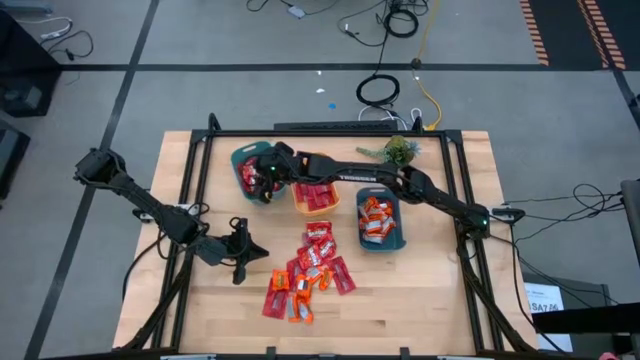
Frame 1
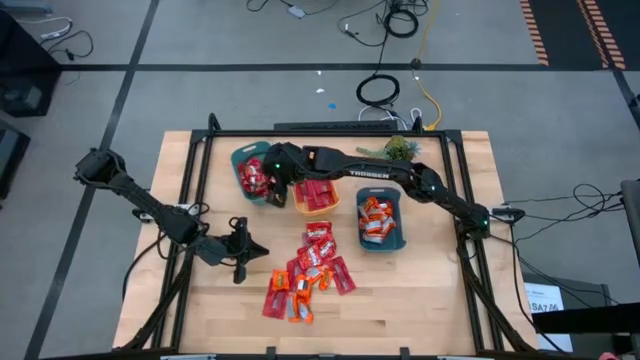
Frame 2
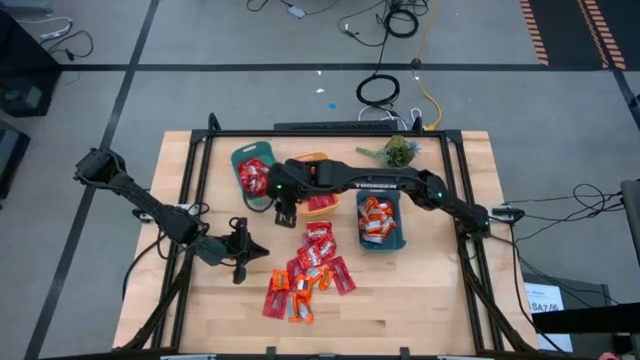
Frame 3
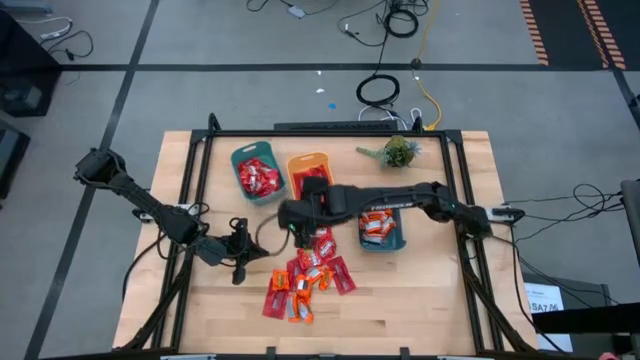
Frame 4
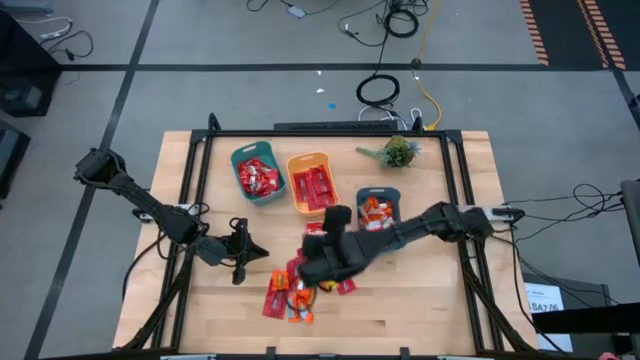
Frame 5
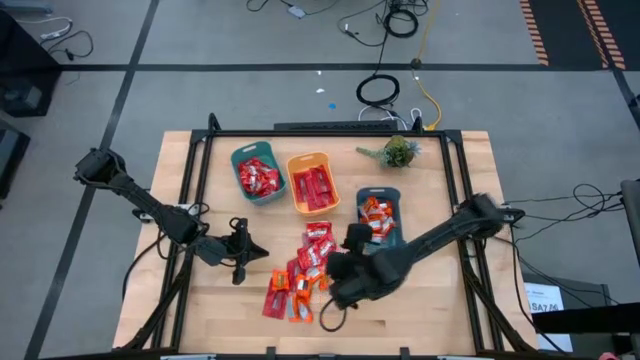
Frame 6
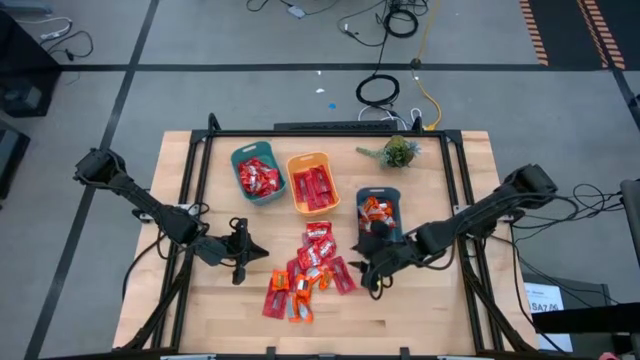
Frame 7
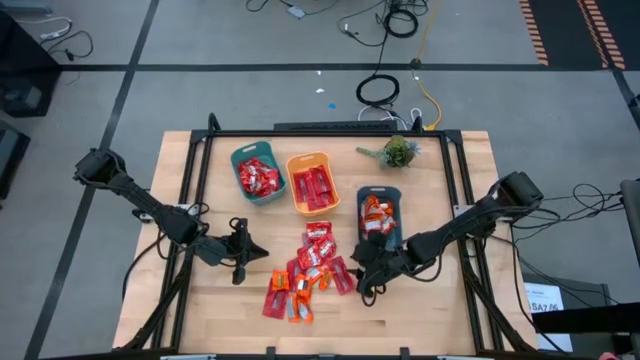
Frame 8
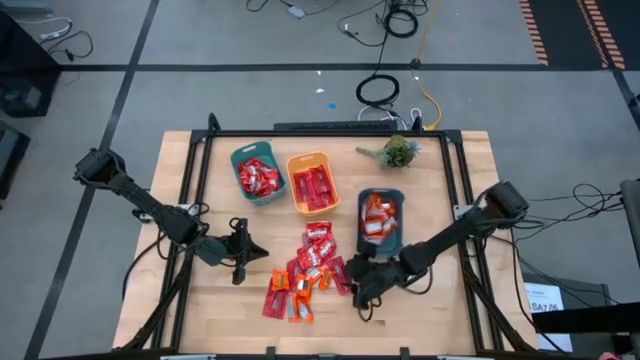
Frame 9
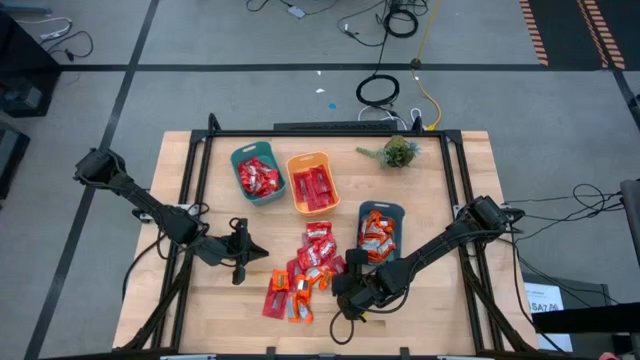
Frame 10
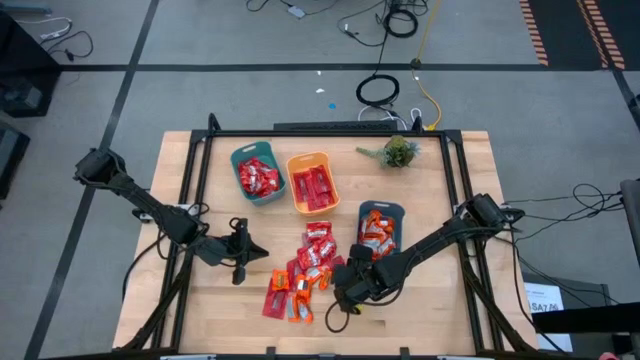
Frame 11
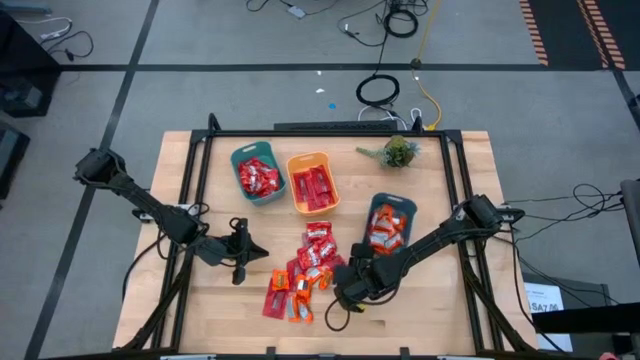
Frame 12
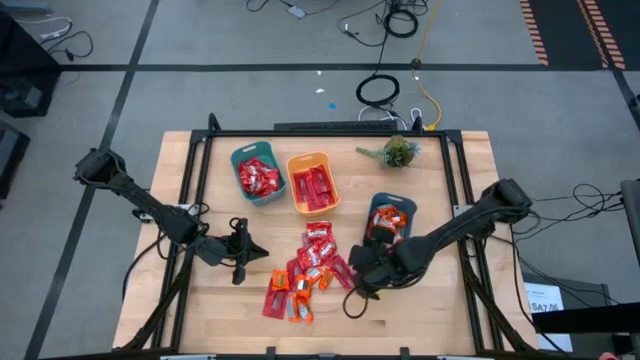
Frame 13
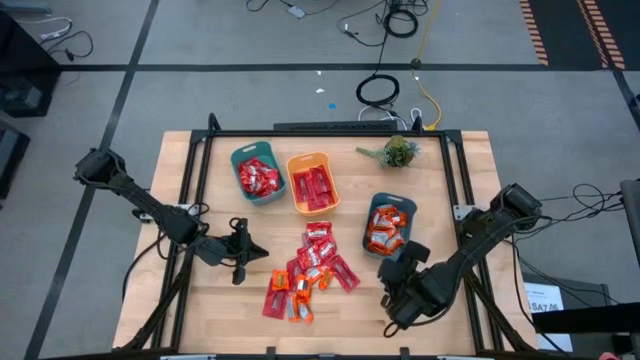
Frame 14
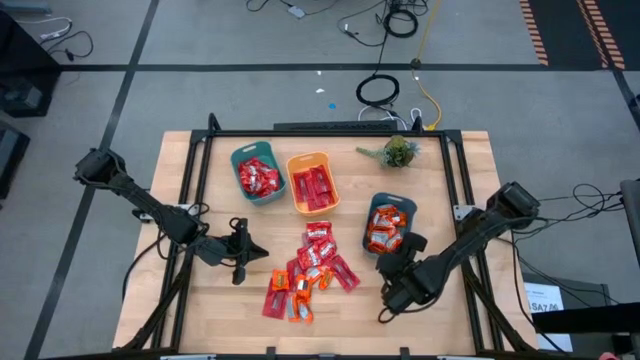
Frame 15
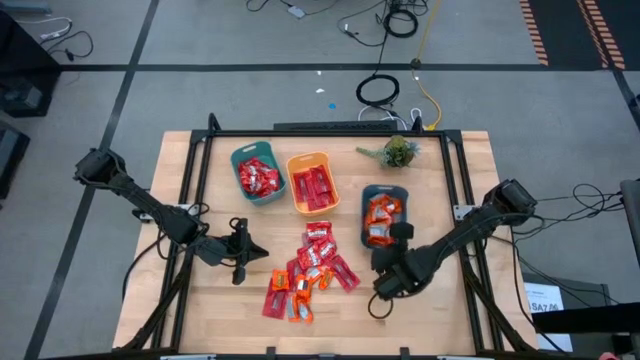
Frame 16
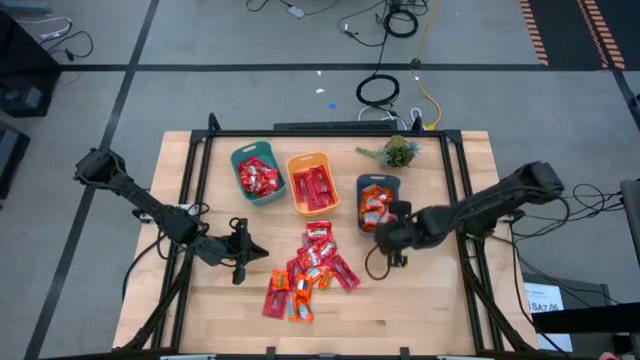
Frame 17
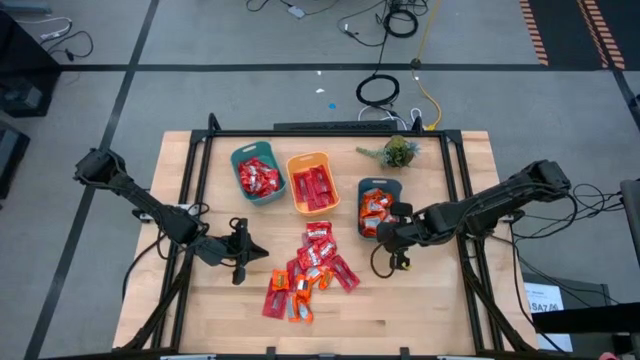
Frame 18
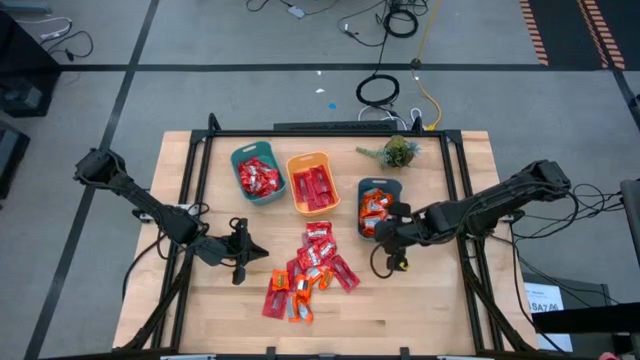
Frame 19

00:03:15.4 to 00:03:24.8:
Task: Sort candy
Adjust the dark blue bin

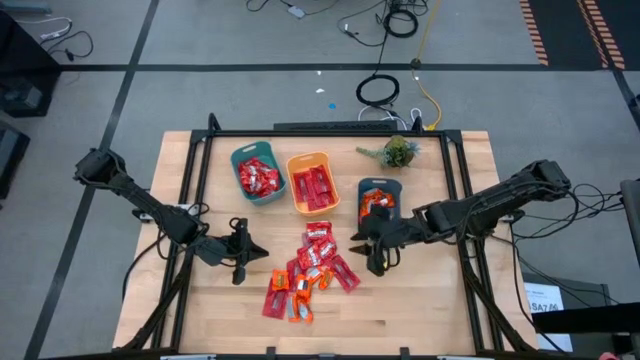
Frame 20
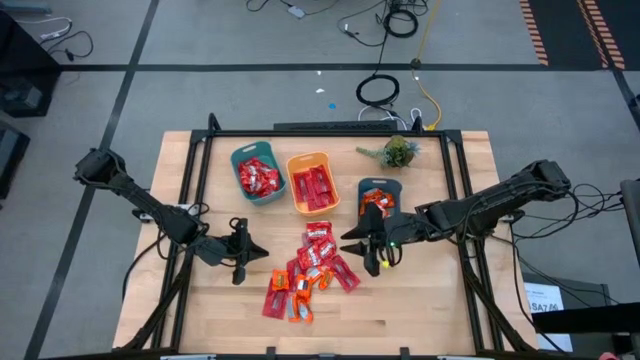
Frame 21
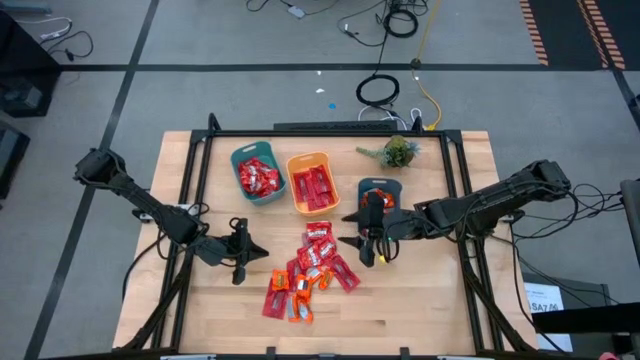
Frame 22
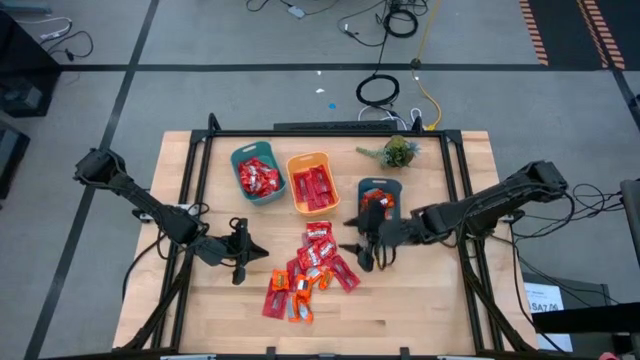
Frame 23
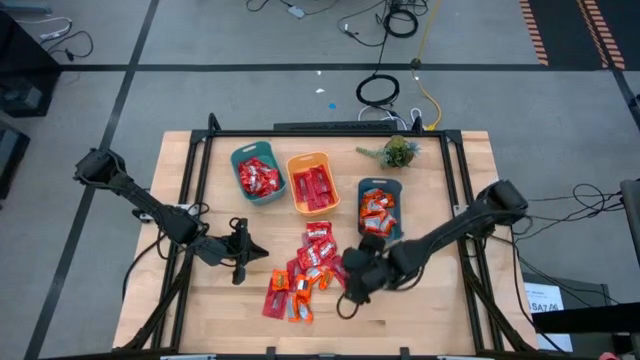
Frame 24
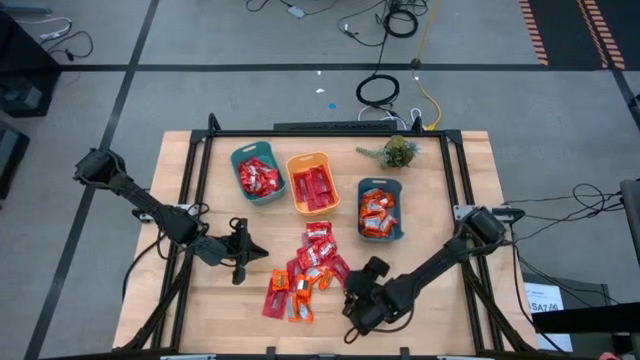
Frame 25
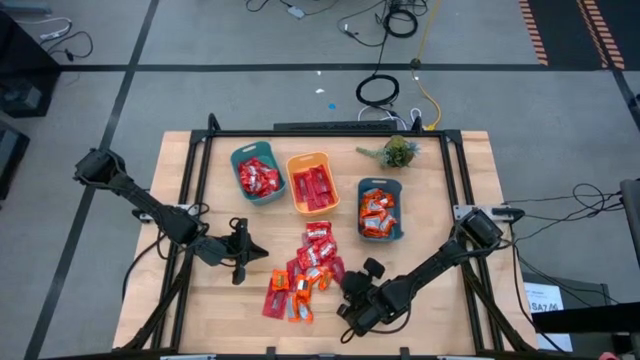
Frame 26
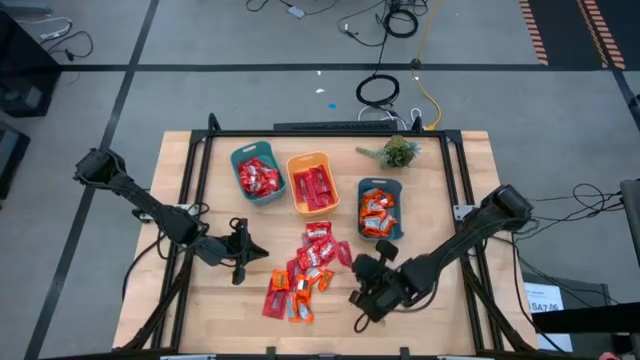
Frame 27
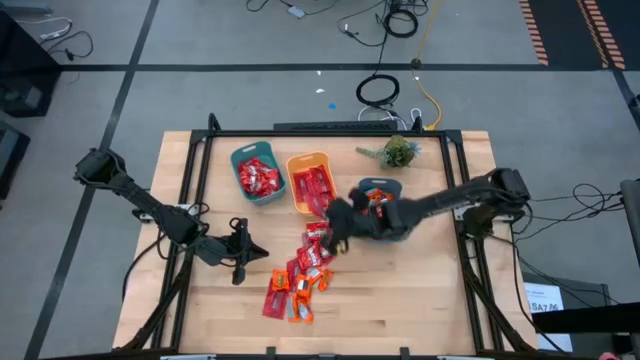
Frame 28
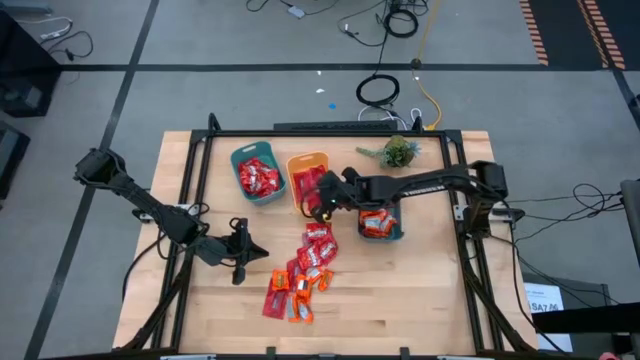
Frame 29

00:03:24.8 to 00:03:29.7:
Put the red wrapper candy into the yellow bin

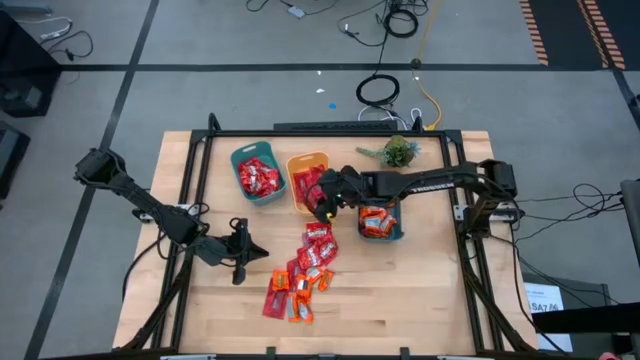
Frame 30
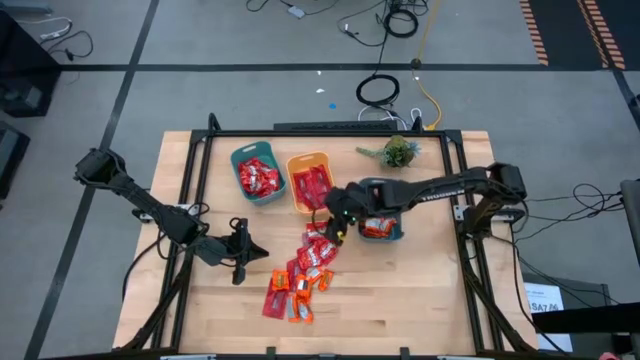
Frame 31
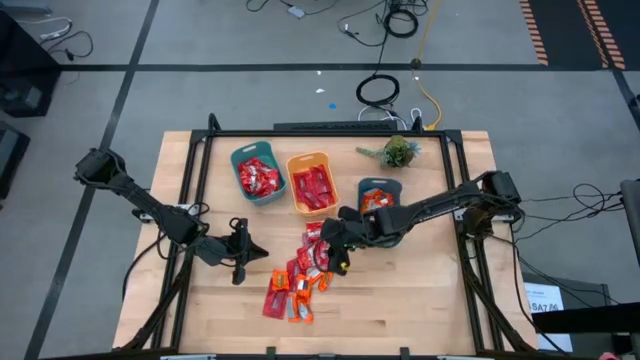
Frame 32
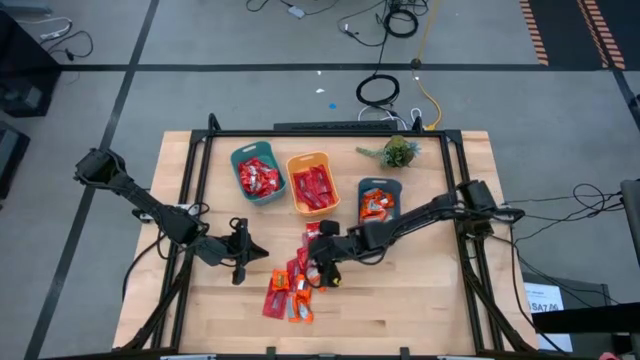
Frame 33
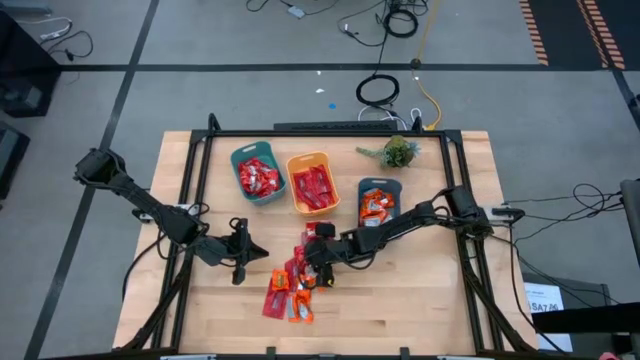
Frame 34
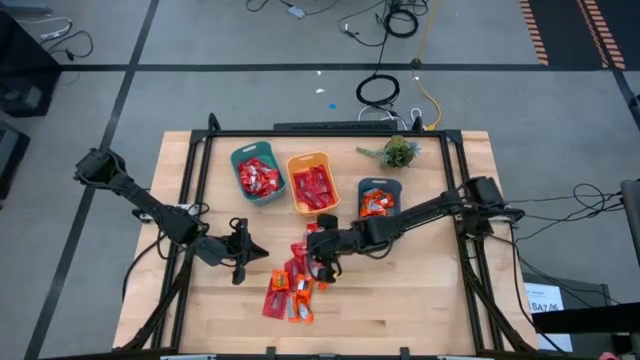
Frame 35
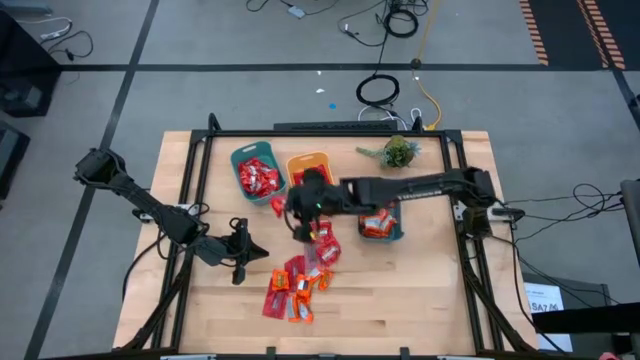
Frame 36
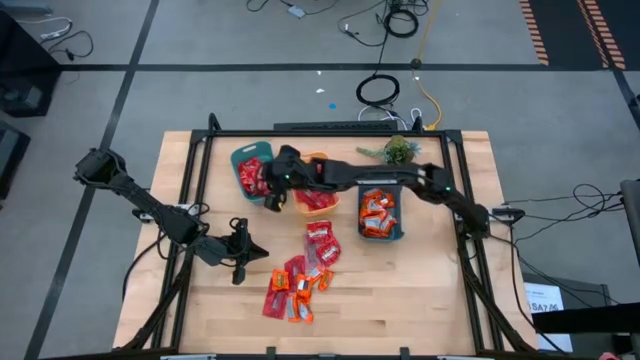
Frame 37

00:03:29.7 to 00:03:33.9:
Put the red pack of candy into the light blue bin

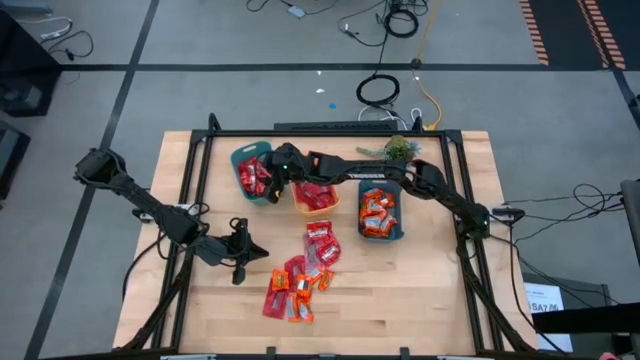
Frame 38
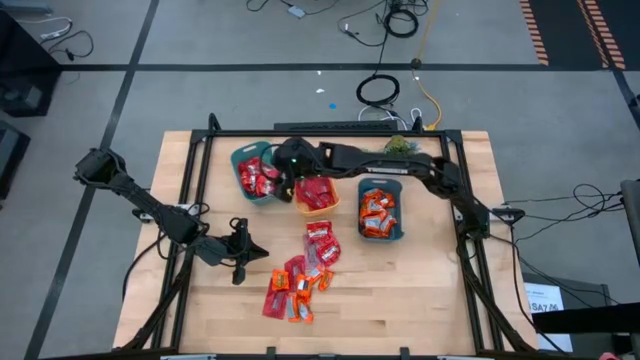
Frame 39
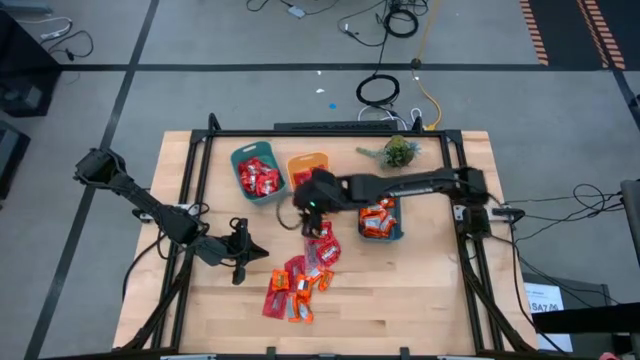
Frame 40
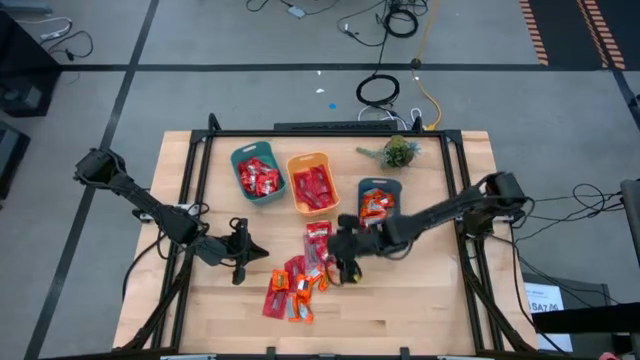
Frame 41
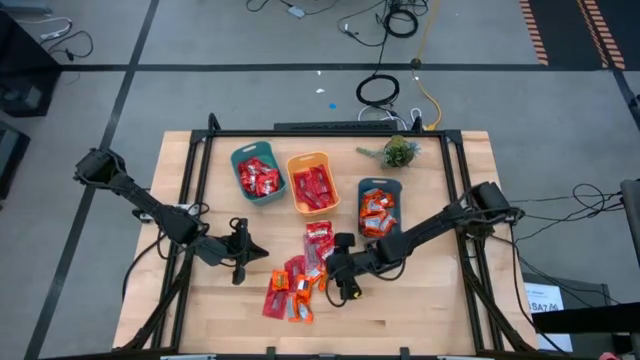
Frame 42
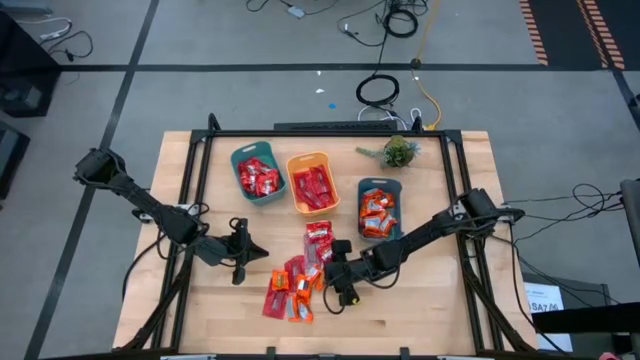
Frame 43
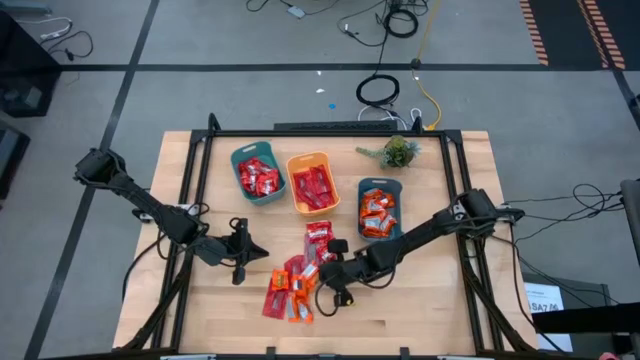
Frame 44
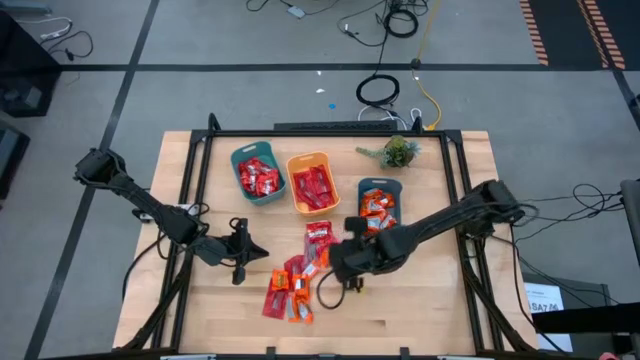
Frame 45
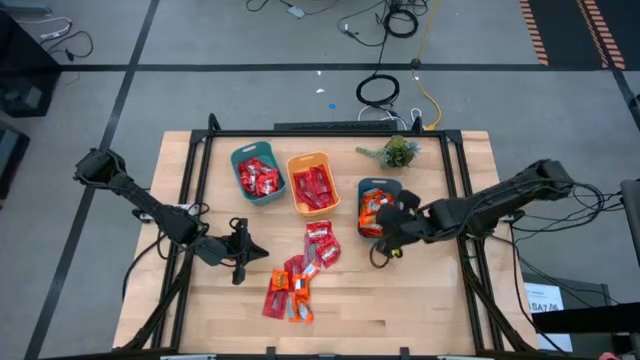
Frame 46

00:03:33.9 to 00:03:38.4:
Put the orange wrapper chocolate into the dark blue bin
